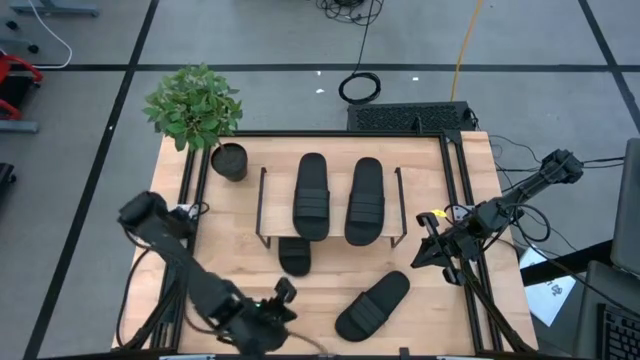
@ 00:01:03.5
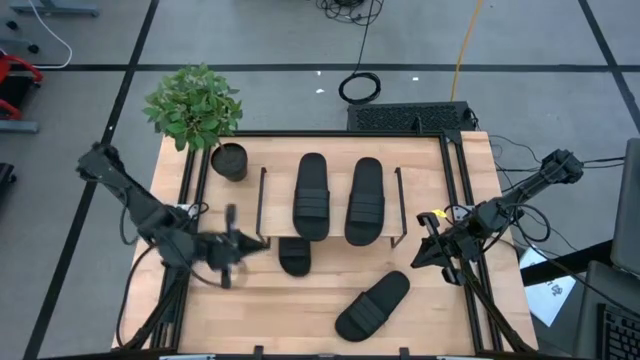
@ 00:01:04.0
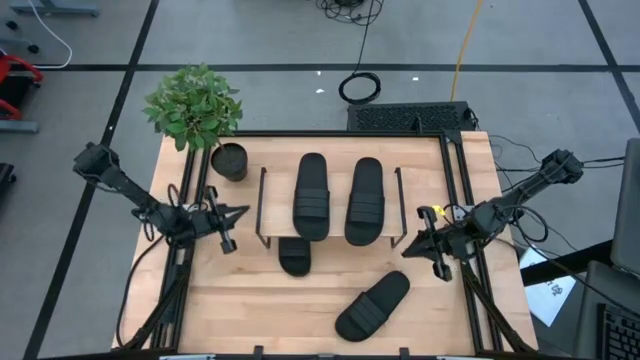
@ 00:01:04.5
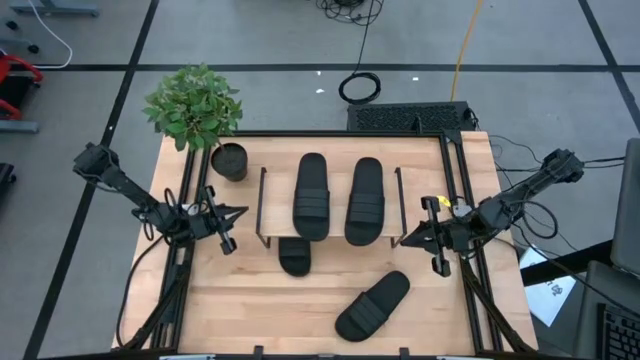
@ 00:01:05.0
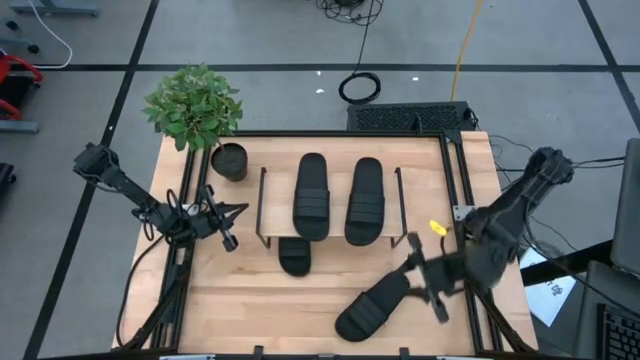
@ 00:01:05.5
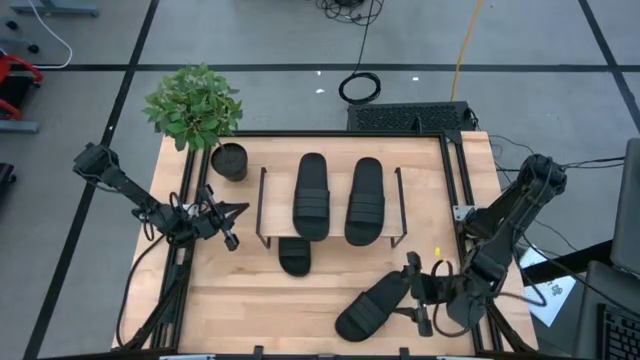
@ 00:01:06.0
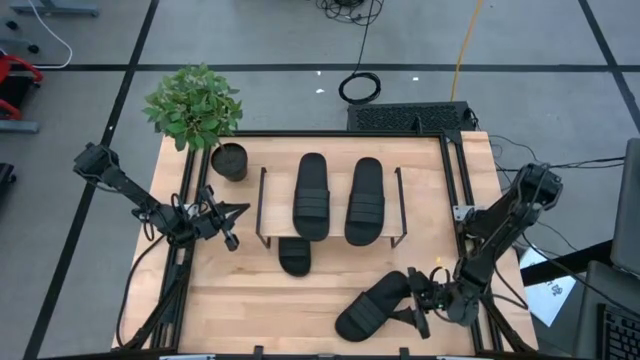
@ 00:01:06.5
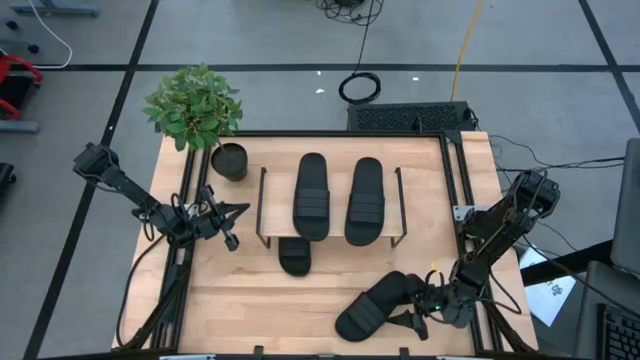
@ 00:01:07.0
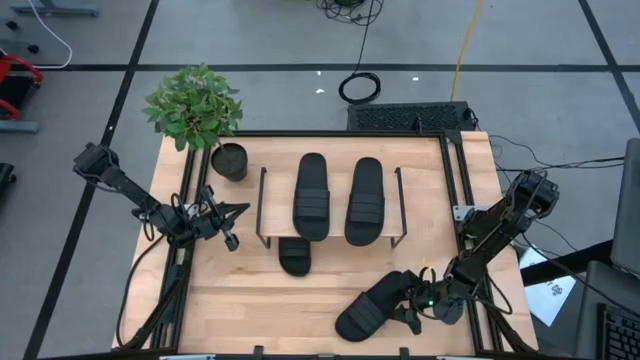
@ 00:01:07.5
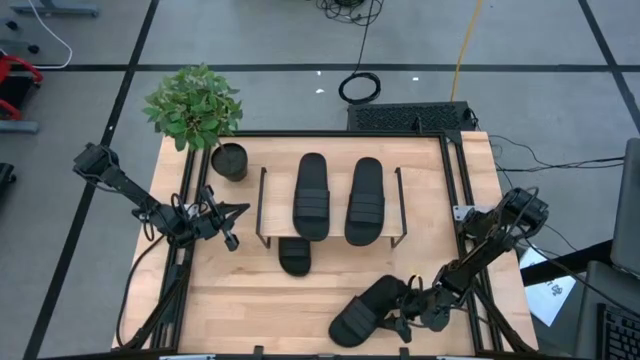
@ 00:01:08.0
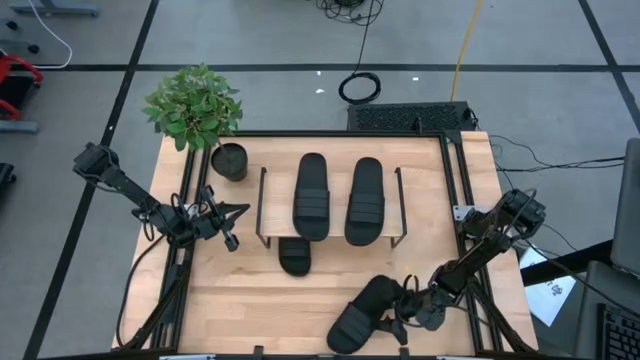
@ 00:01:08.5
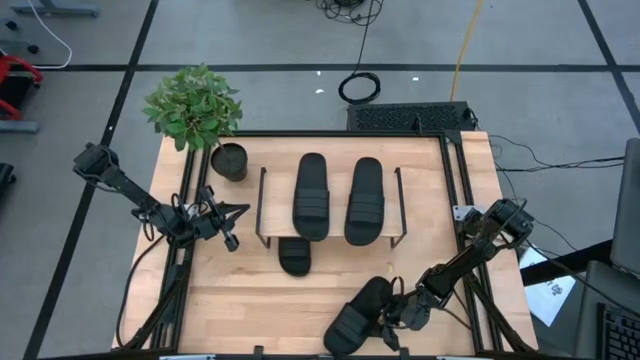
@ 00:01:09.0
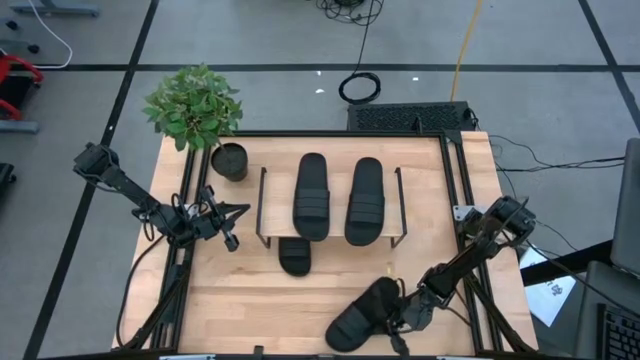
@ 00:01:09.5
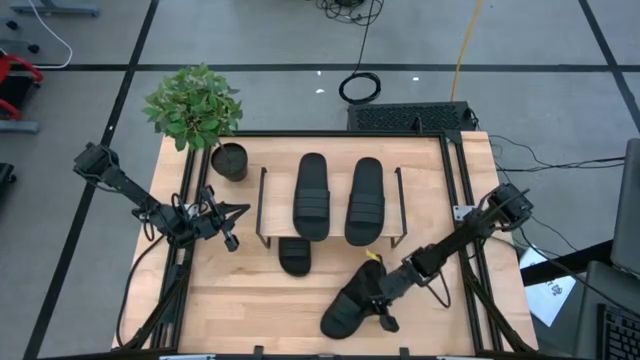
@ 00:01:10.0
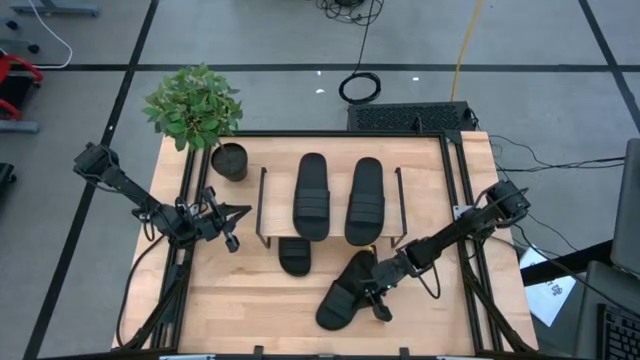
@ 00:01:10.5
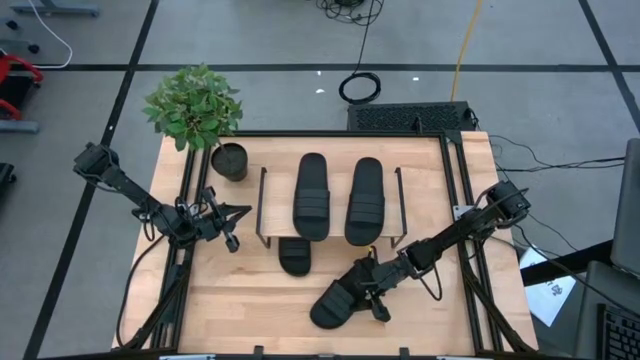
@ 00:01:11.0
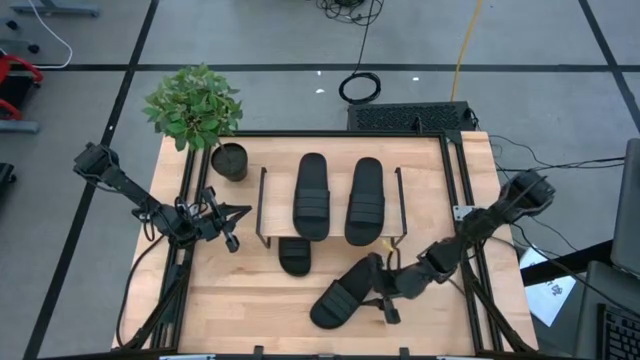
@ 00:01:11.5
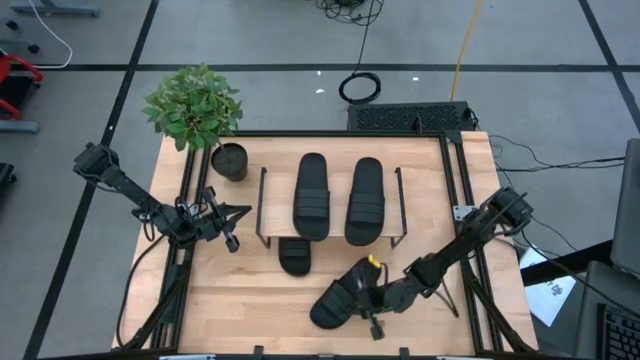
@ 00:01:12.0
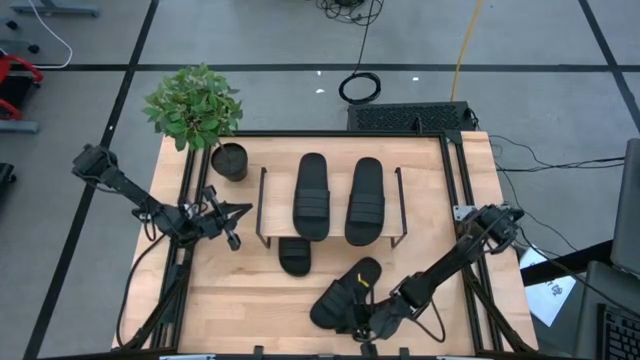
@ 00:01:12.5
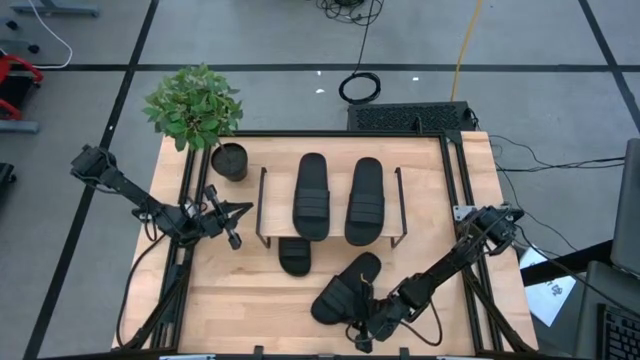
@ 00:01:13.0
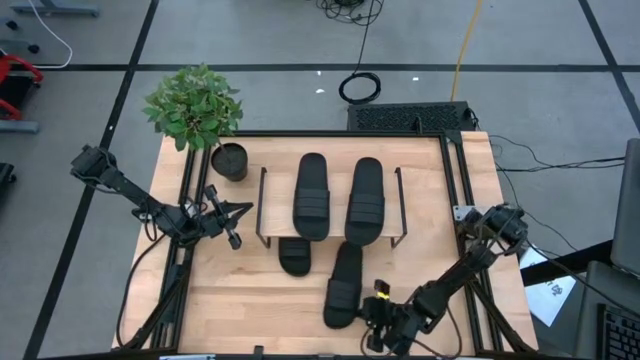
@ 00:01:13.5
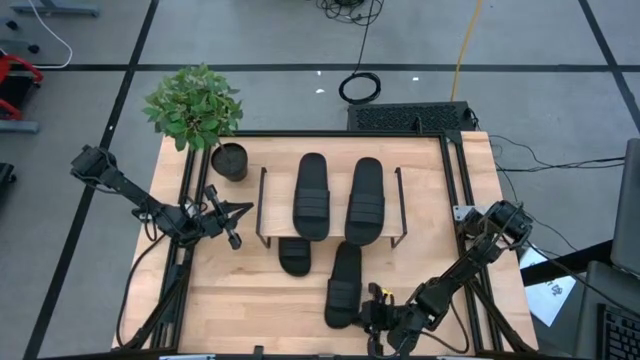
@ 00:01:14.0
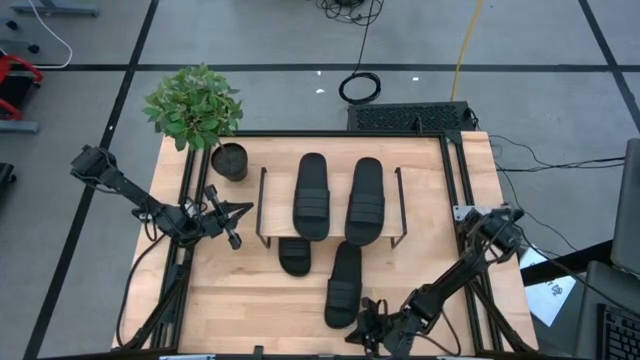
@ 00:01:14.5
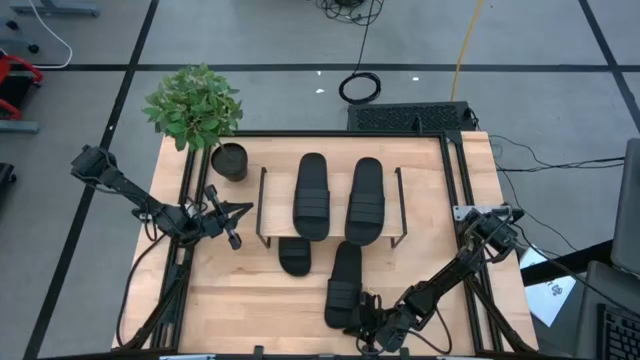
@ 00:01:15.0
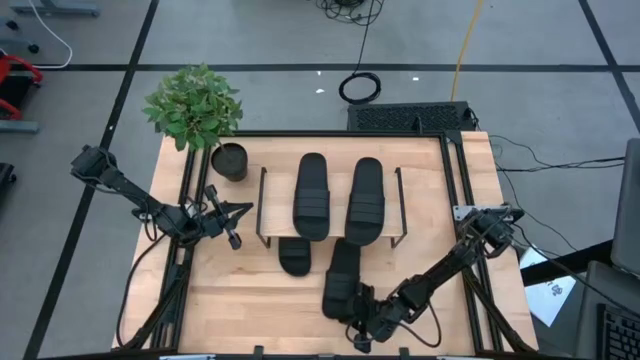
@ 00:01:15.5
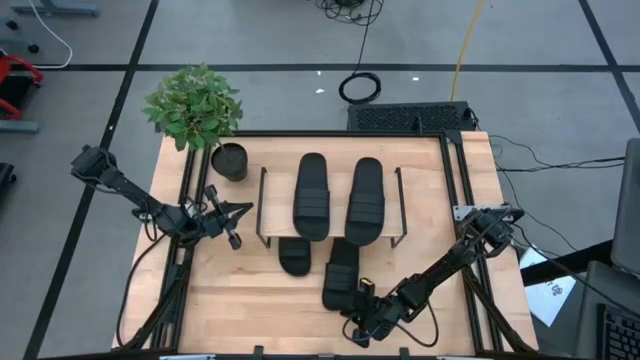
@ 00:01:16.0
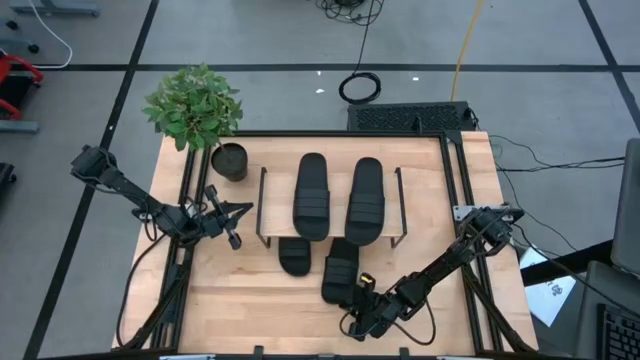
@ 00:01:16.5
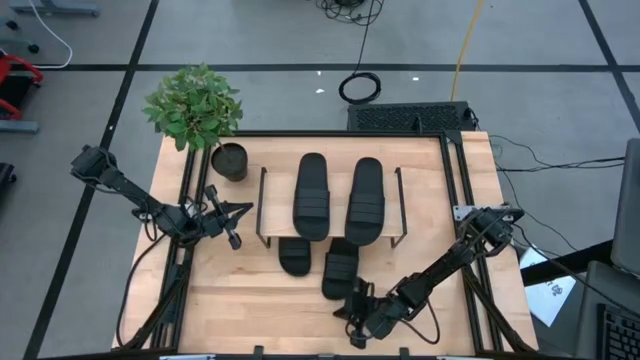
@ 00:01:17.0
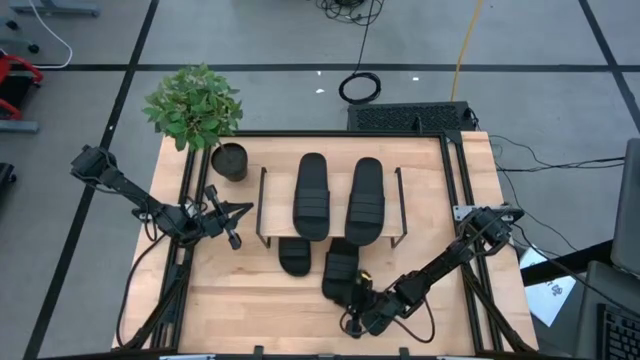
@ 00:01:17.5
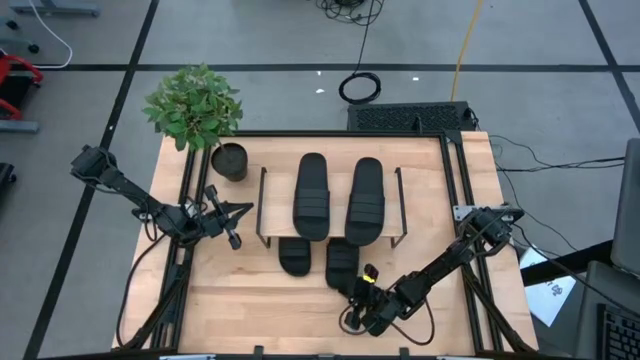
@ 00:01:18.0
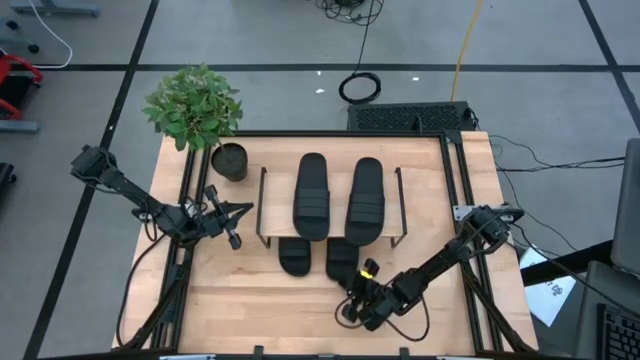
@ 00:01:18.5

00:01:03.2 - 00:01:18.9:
Task: Pick and place slides into the shelf
Put the black slide under the shelf

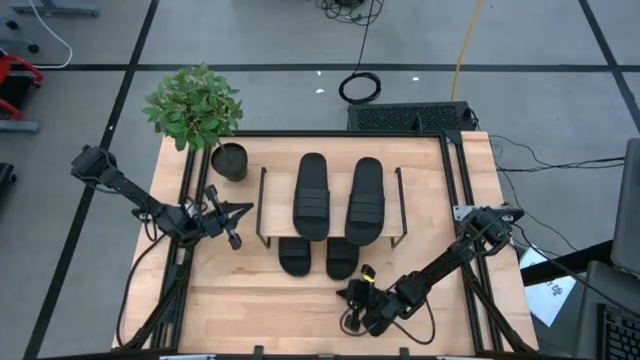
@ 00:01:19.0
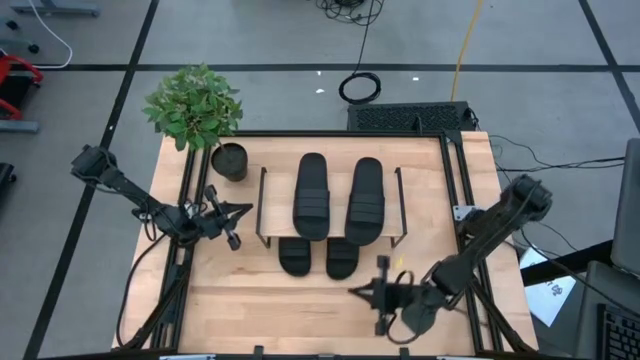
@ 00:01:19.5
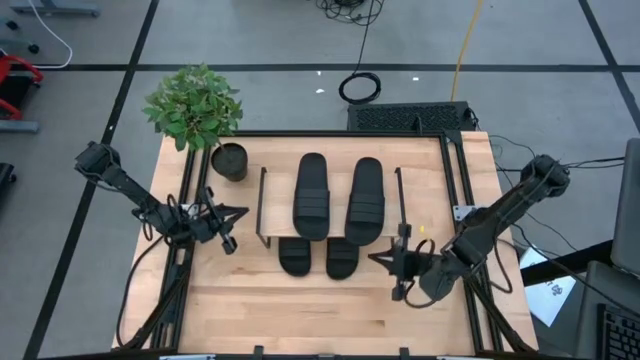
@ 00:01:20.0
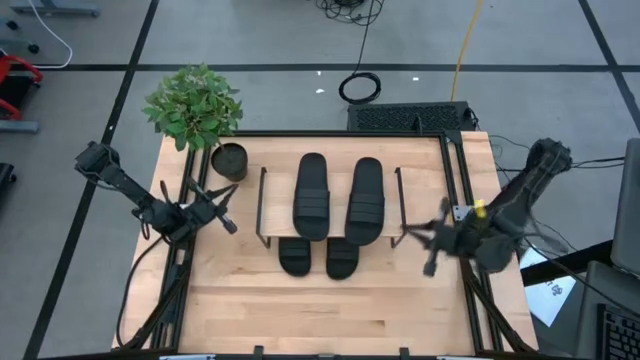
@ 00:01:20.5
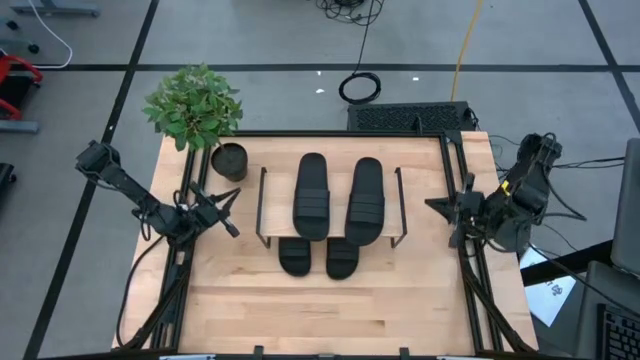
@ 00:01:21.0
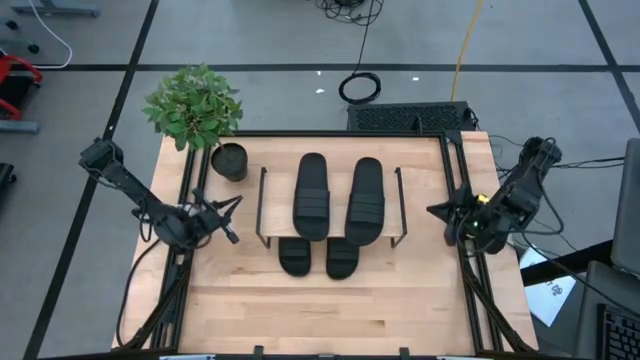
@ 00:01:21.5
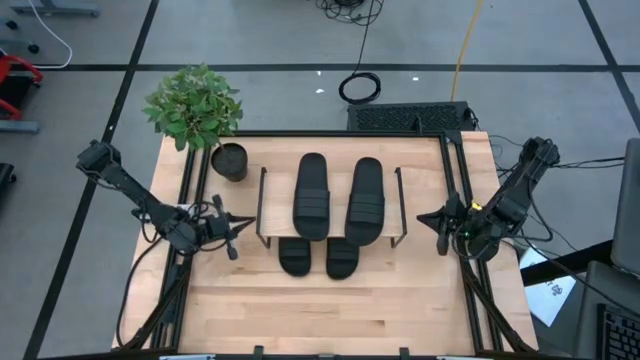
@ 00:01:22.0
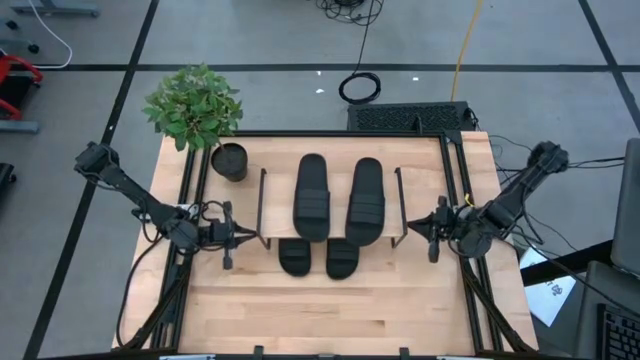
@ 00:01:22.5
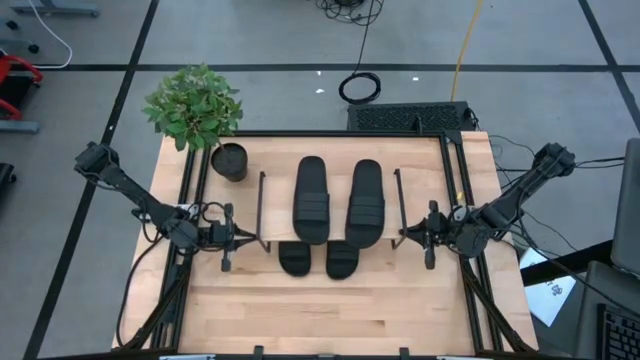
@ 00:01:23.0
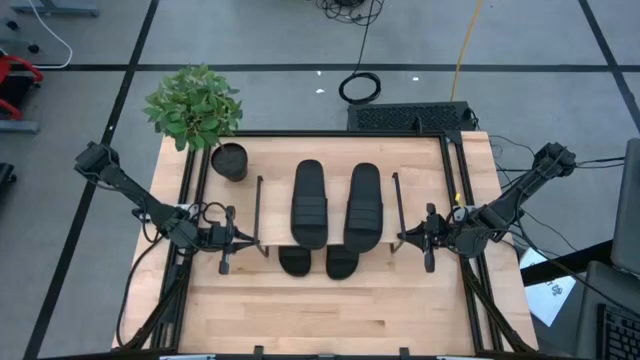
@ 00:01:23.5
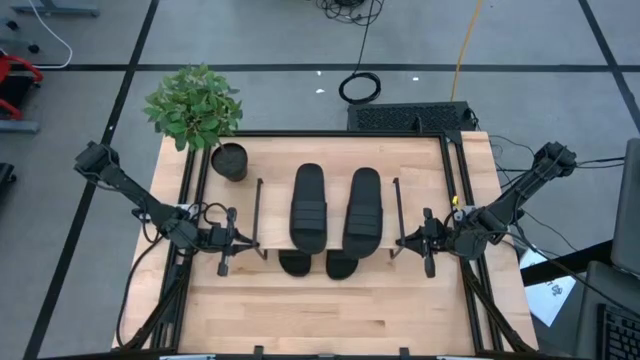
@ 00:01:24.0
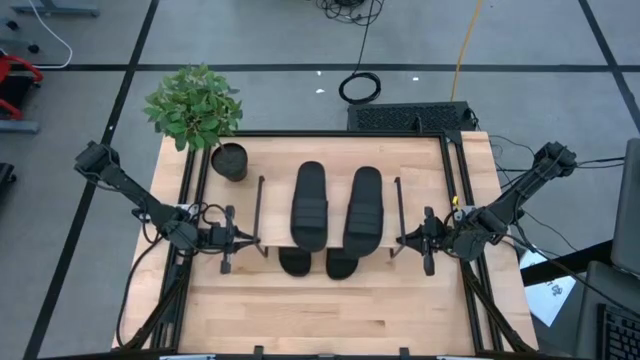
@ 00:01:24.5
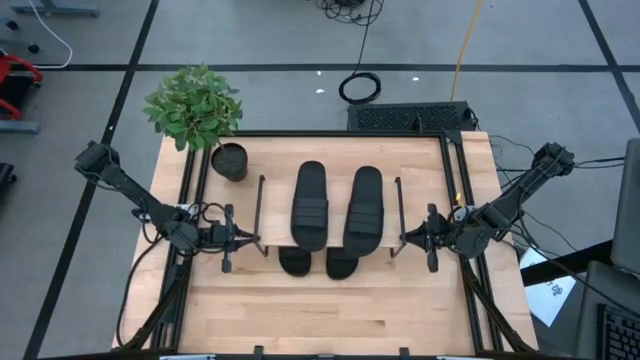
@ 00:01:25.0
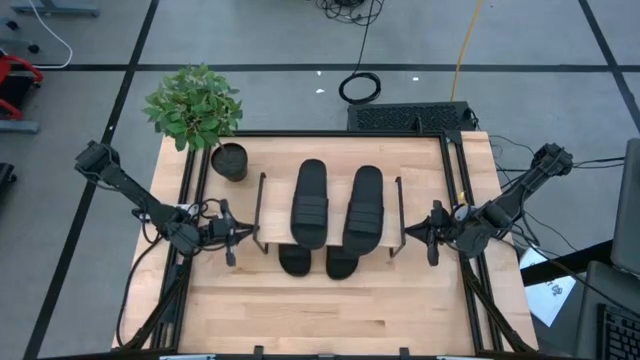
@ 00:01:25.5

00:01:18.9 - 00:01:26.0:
Adjust the shelf
